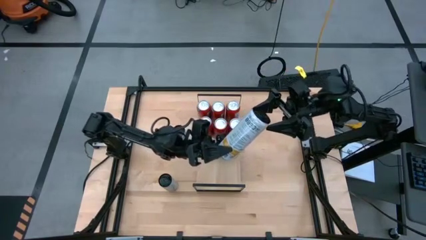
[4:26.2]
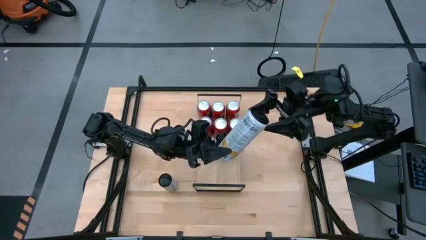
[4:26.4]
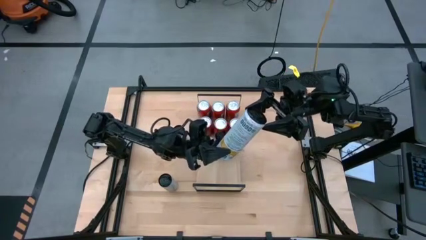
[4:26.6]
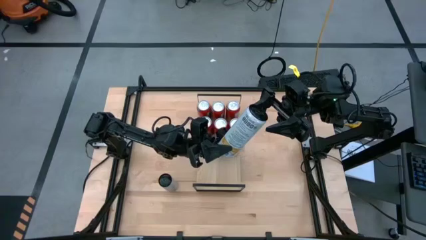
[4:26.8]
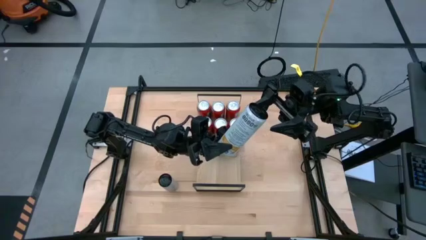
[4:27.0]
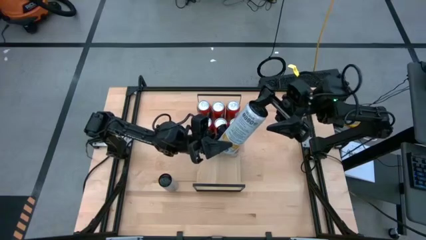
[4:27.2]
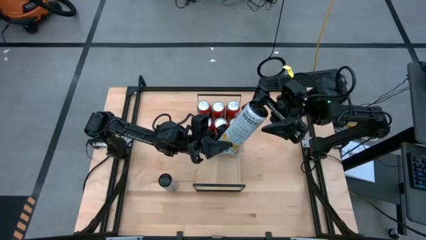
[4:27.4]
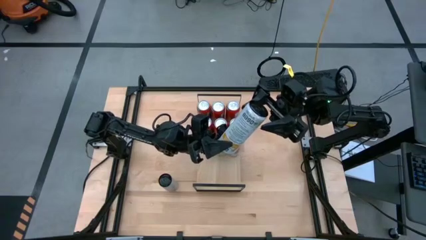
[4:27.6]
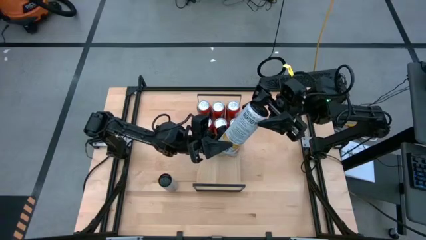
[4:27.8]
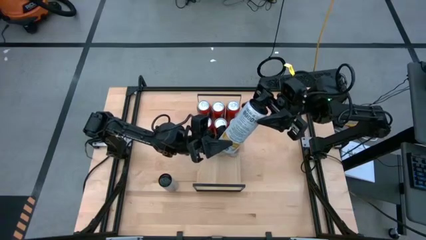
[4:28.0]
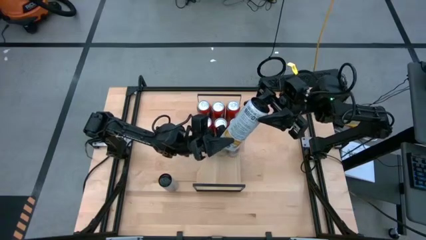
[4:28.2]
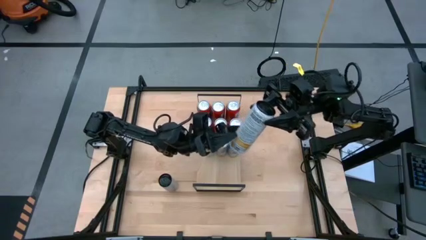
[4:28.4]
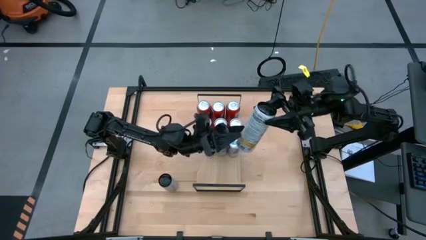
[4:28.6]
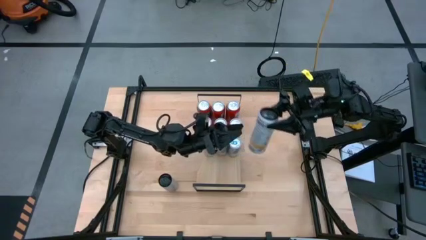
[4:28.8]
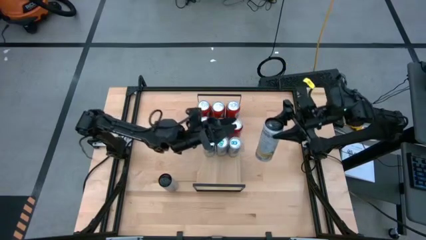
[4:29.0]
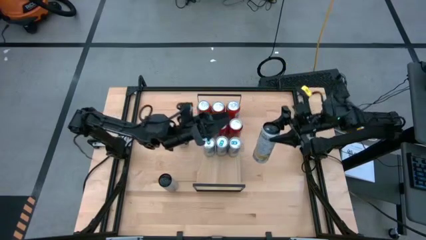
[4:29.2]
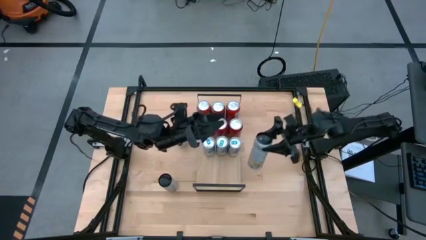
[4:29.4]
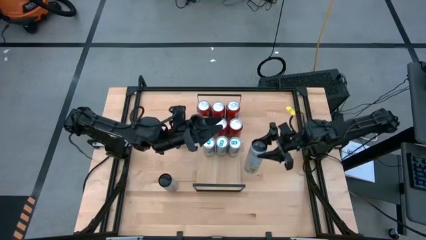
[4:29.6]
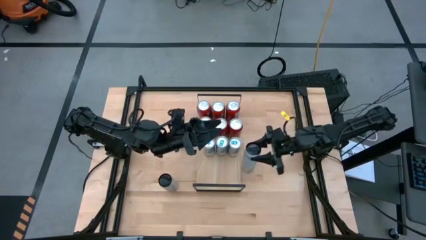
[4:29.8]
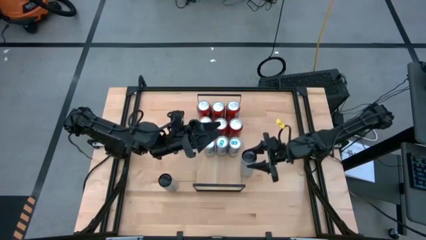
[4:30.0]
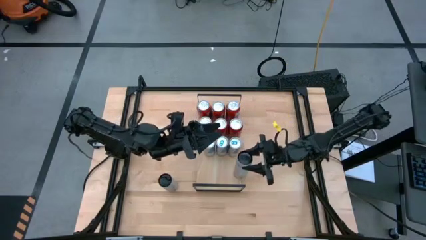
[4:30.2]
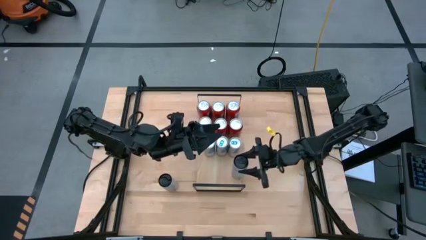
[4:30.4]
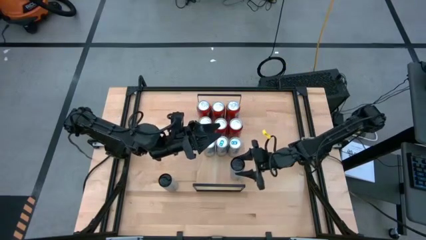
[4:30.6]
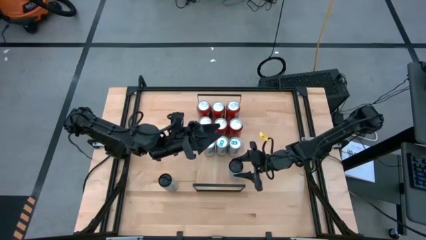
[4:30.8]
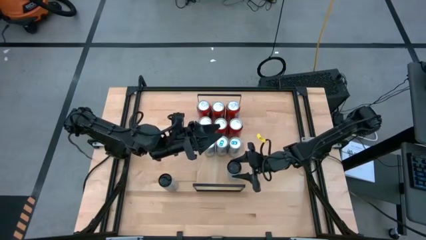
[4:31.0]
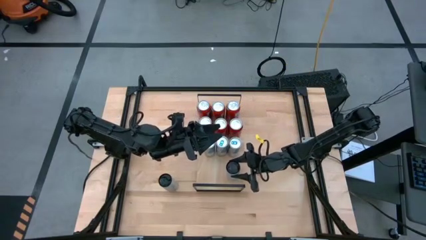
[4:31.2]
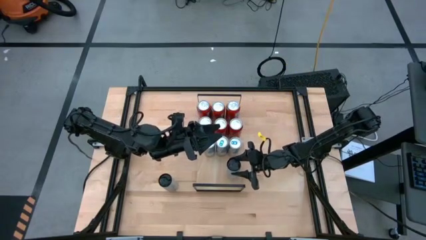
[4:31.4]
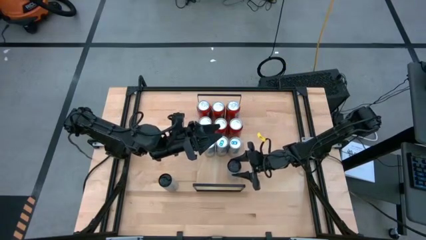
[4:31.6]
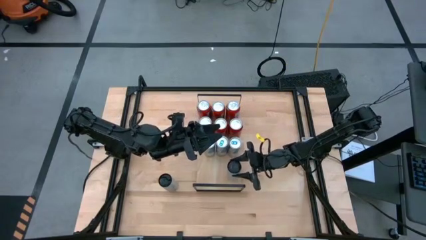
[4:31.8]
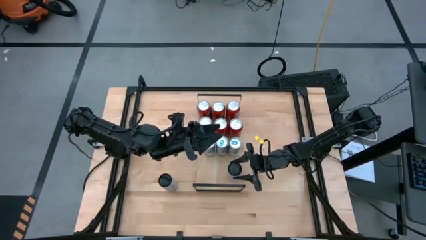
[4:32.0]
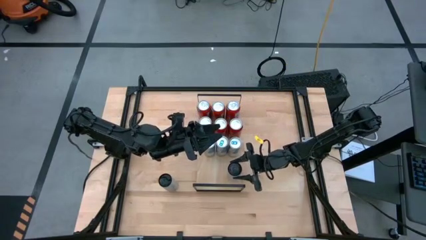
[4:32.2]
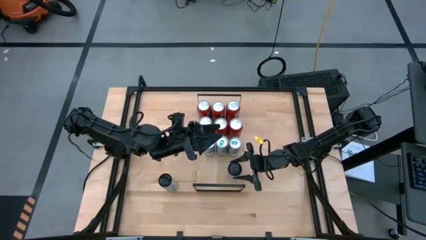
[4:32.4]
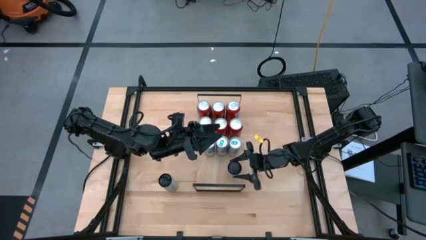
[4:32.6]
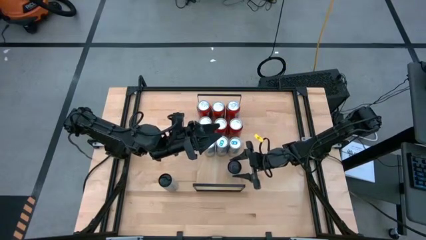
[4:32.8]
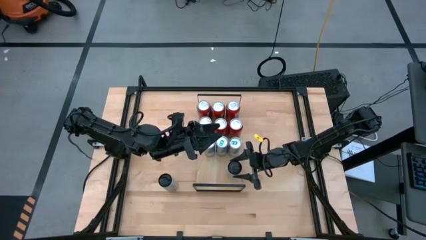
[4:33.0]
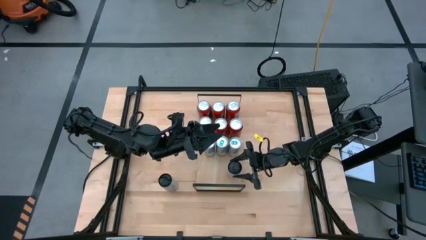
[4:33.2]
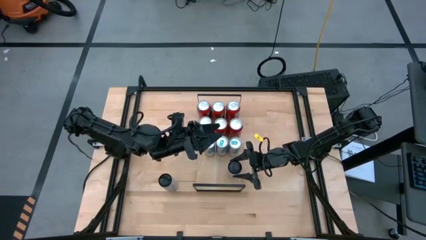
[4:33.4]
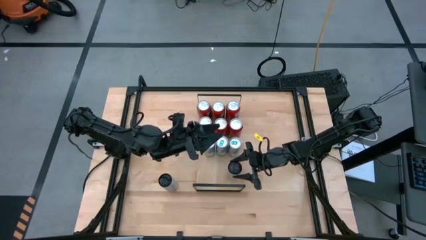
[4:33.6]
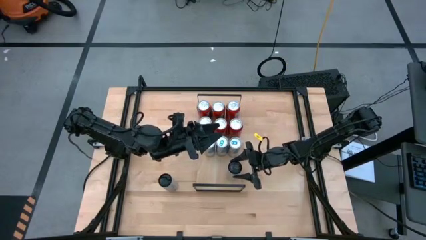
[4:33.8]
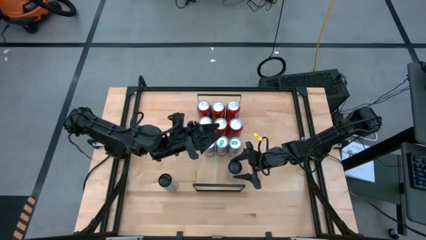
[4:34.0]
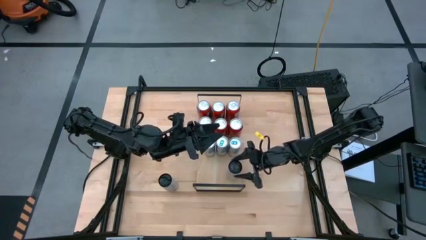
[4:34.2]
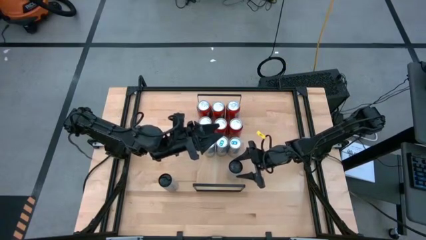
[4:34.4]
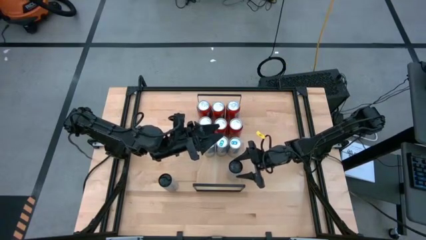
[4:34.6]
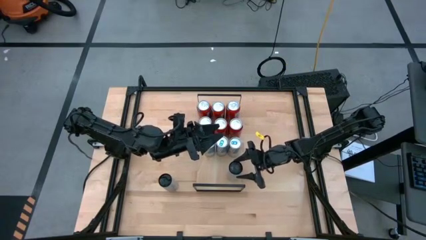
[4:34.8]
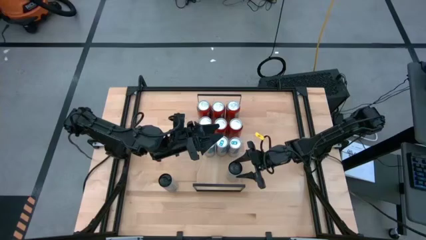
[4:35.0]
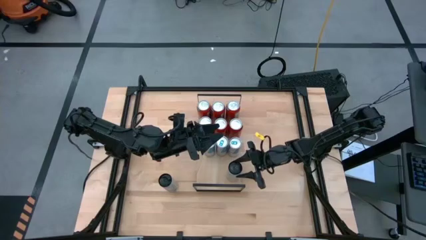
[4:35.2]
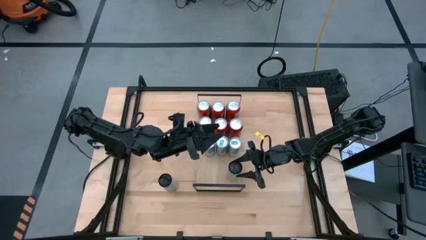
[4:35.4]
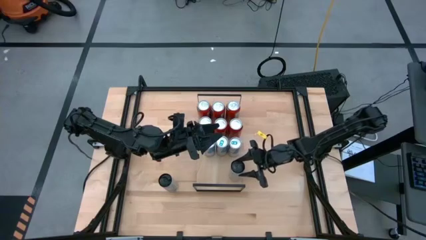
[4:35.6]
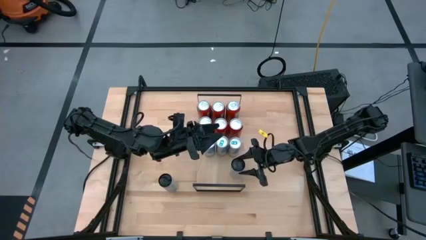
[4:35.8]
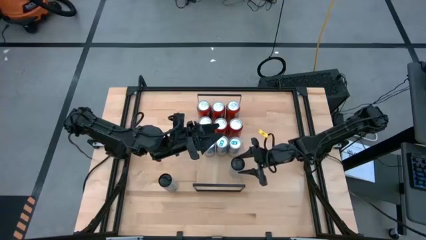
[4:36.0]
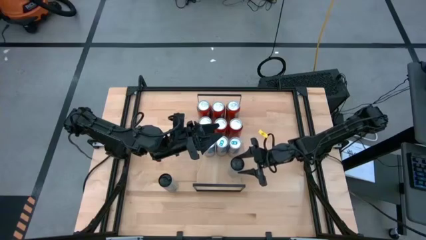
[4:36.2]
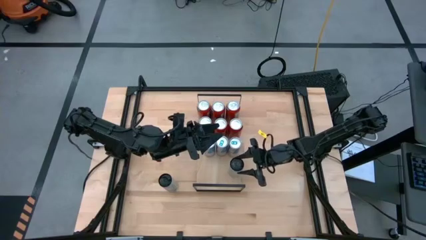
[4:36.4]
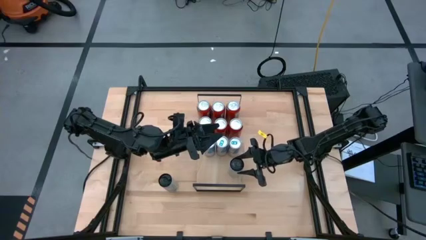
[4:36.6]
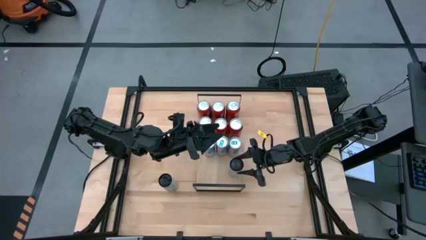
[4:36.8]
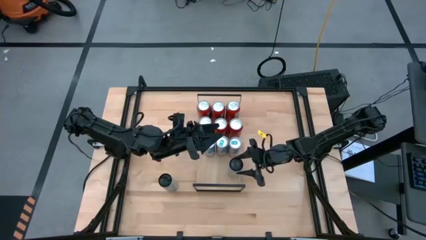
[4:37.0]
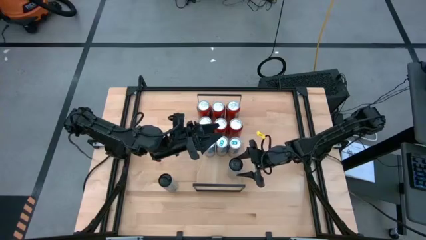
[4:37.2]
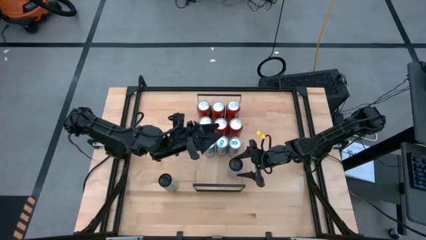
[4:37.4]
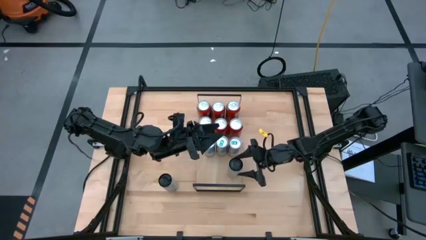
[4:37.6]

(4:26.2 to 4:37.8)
Task: Place canned beverage on shelf
Put the top white yellow soda can on the shelf

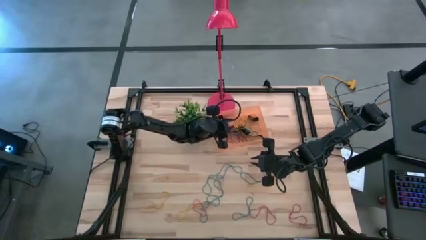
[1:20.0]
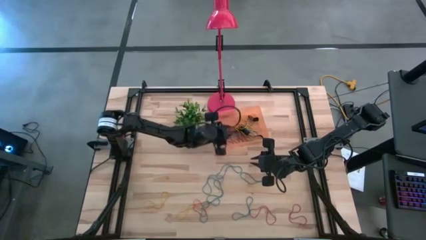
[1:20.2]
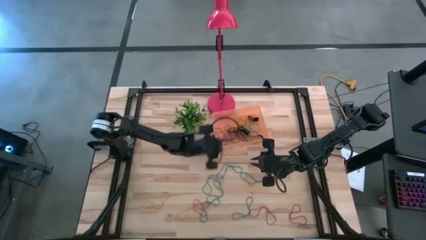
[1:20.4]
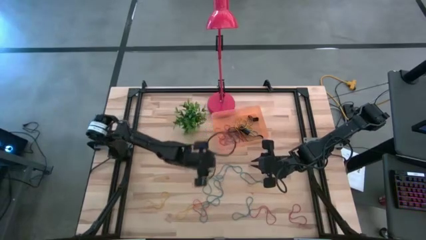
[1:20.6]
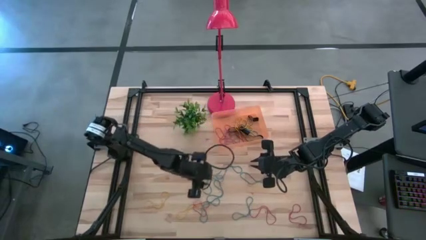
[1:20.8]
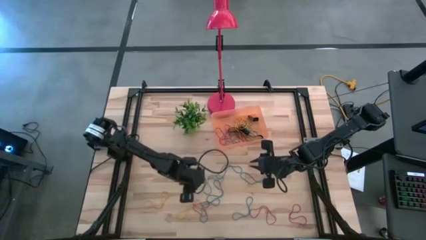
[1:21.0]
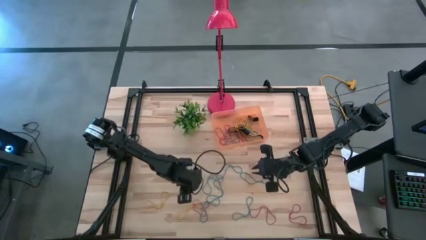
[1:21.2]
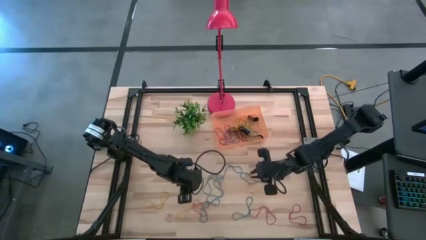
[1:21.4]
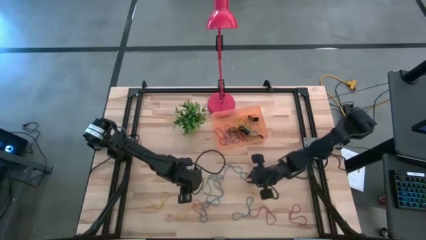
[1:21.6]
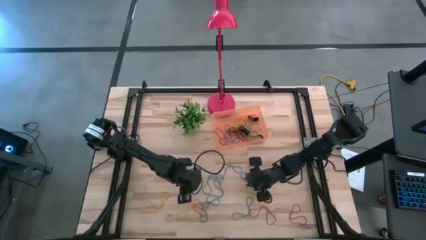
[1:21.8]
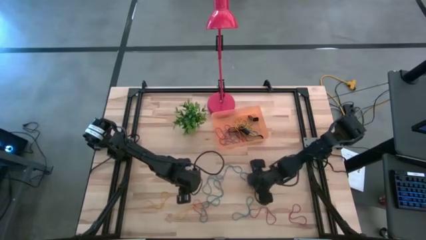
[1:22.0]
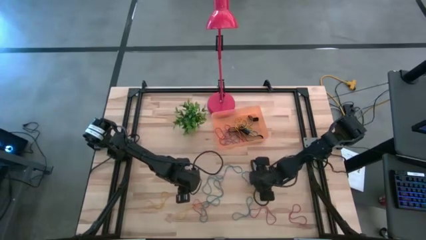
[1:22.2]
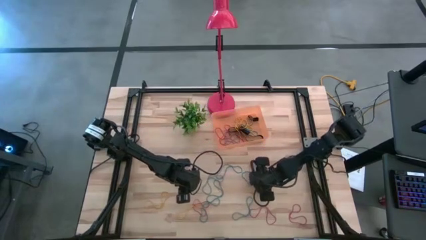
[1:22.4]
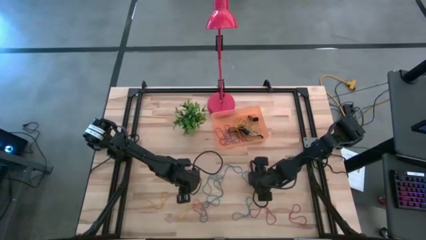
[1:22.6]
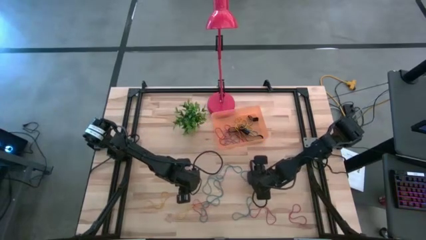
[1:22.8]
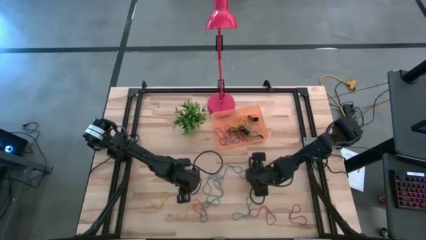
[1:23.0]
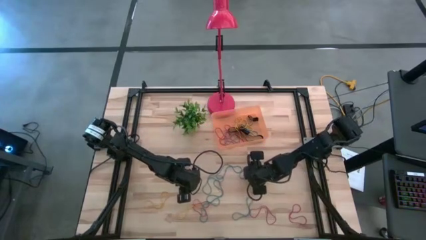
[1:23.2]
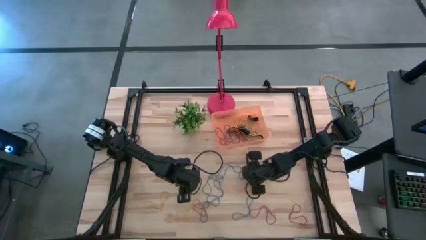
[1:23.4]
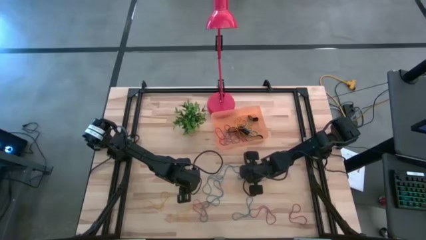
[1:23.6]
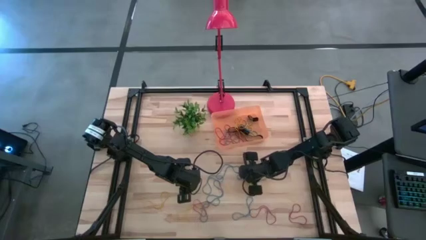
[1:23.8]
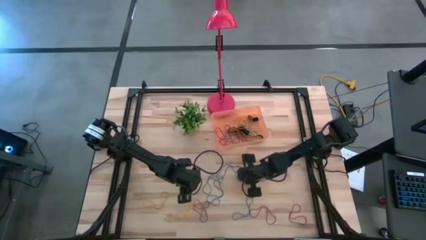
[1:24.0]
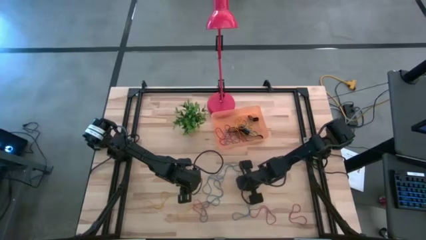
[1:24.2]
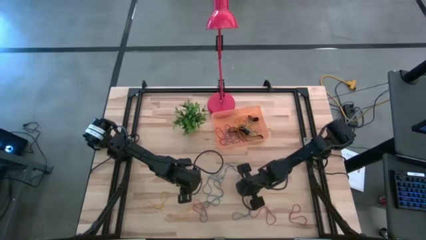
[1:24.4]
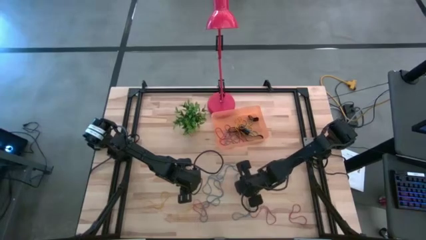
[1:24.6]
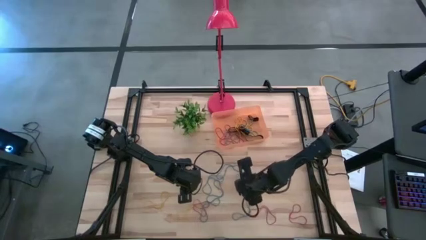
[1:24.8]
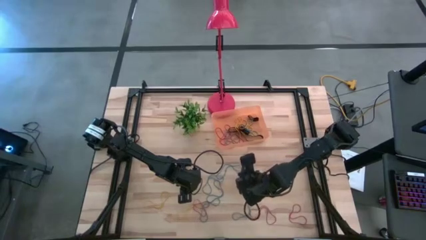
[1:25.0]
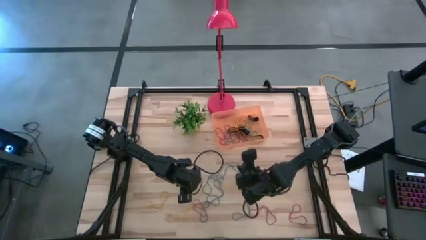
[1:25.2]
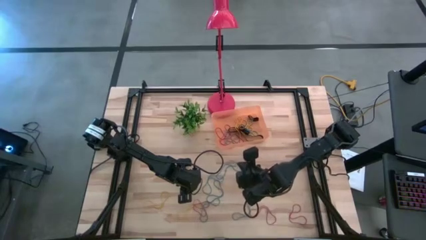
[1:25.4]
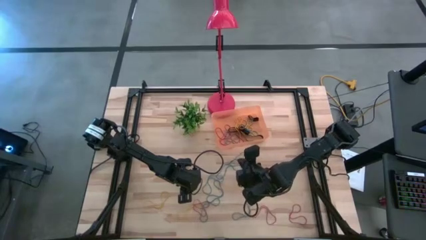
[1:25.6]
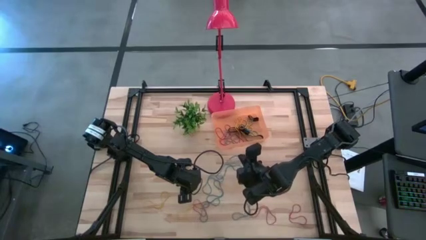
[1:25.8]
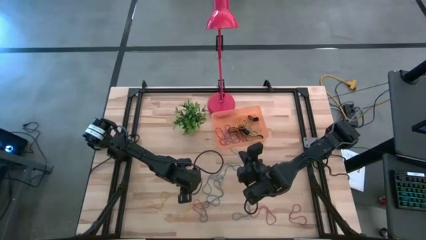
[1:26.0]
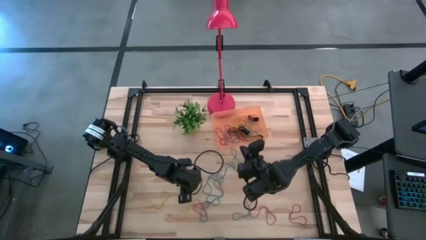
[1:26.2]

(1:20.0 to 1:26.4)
Task: Pick and place rubber bands into bin
Put the blue rubberband into the orange container
